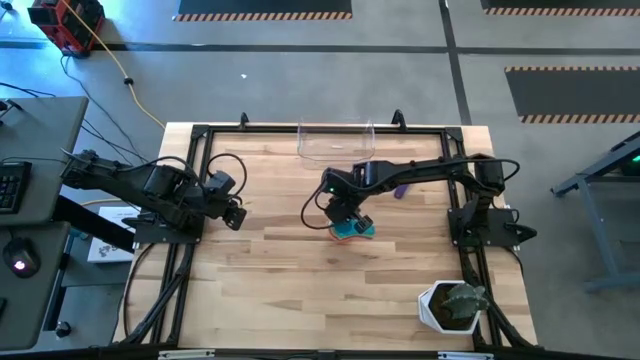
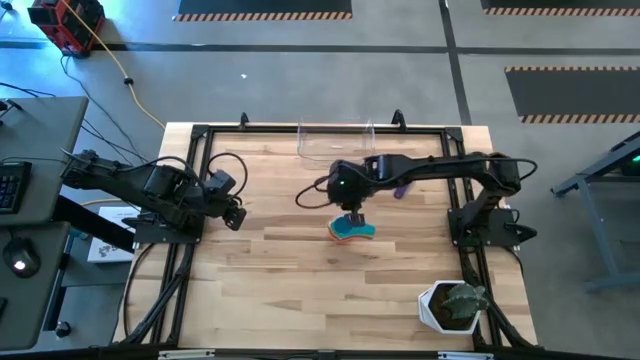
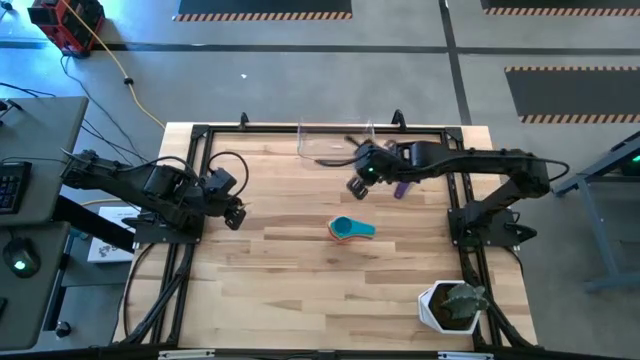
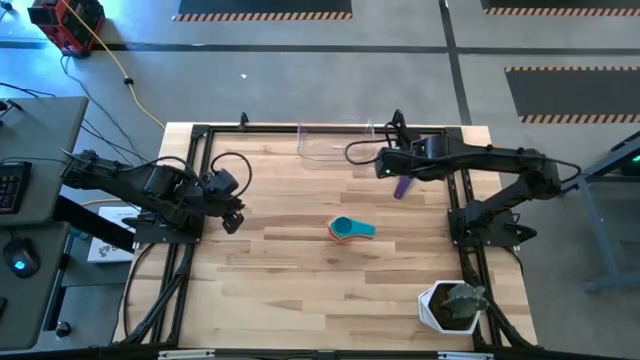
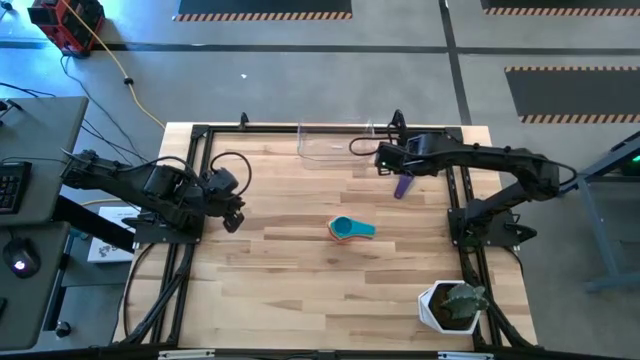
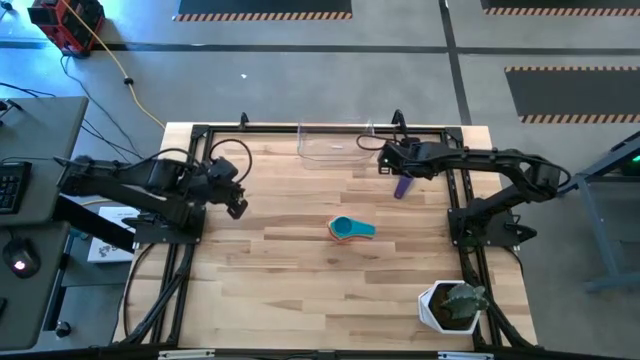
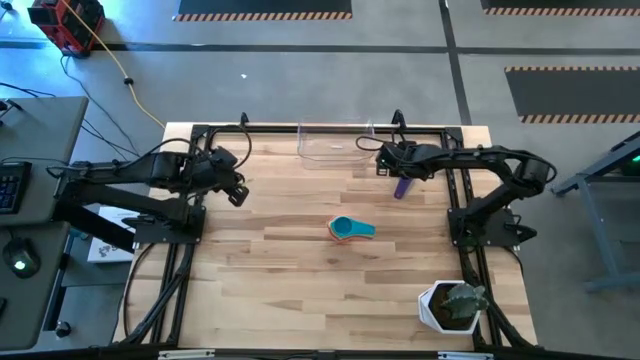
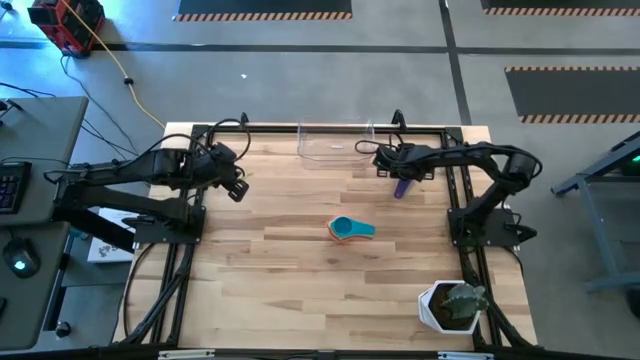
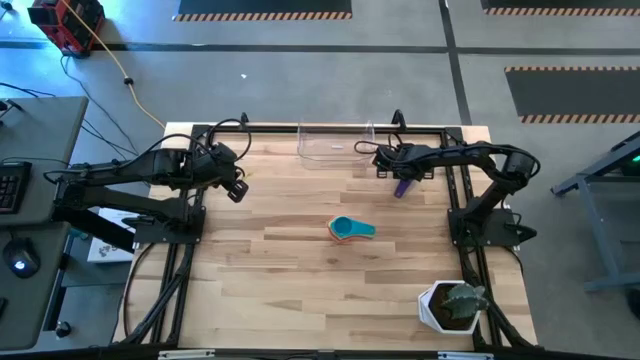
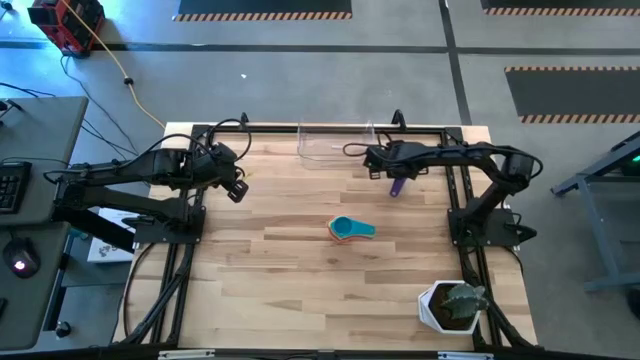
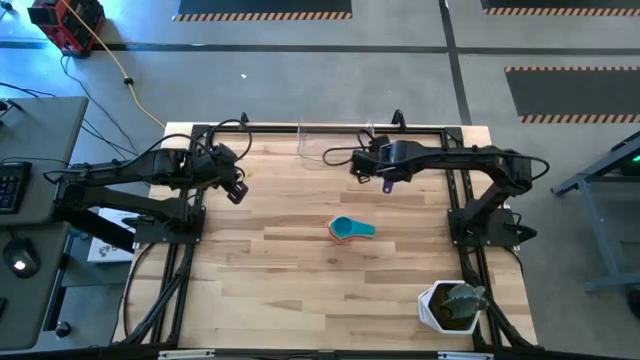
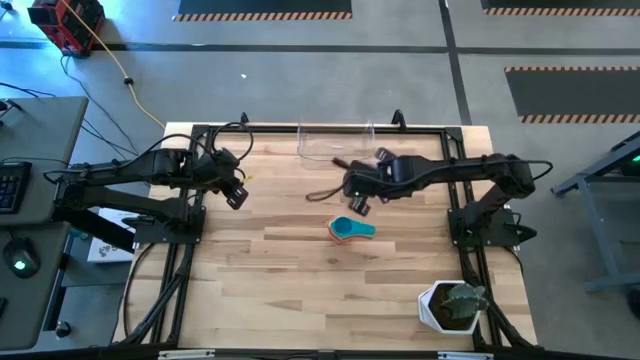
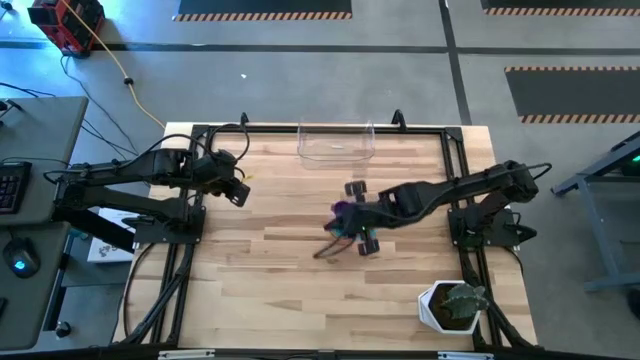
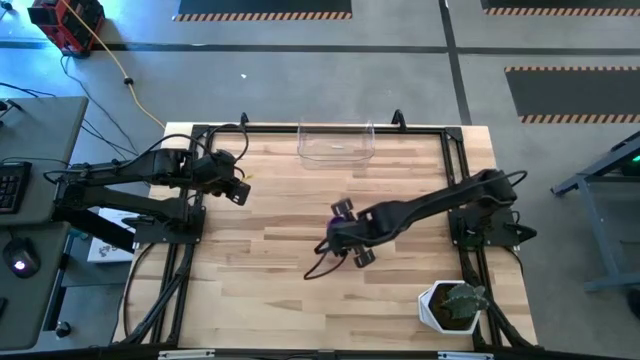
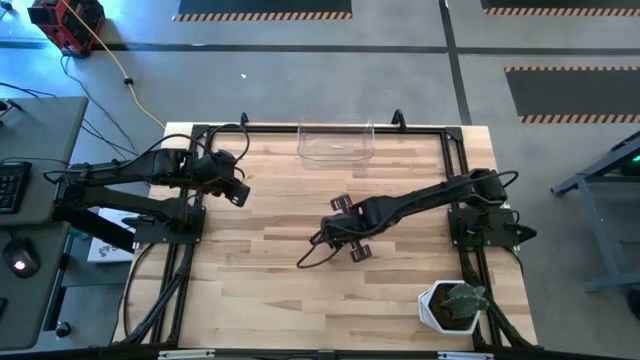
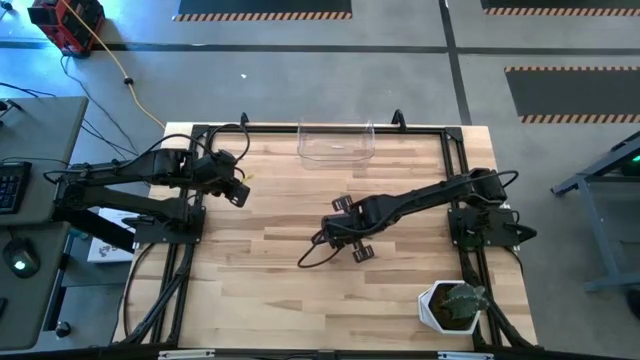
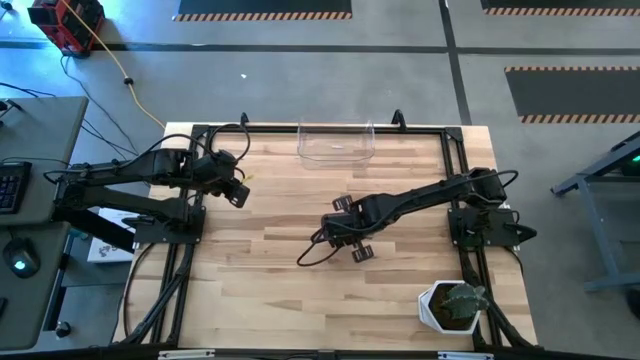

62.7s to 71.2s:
Task: Nest measuring cups in basket
Stack the dark blue measuring cup on top of the light blue measuring cup

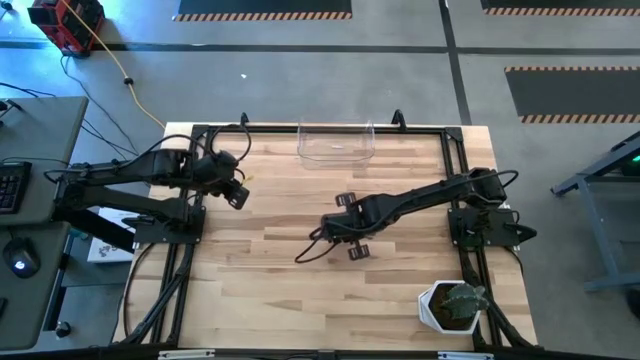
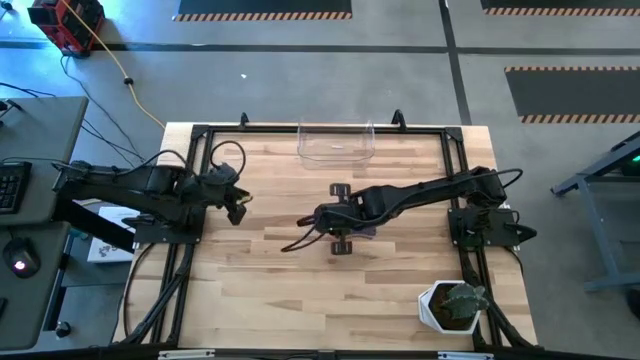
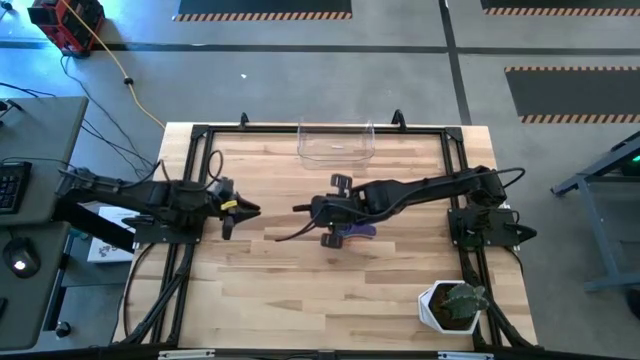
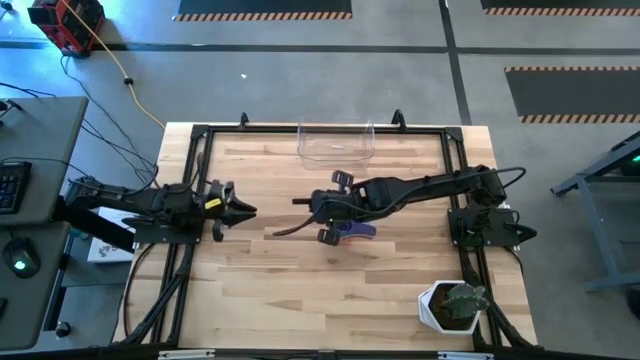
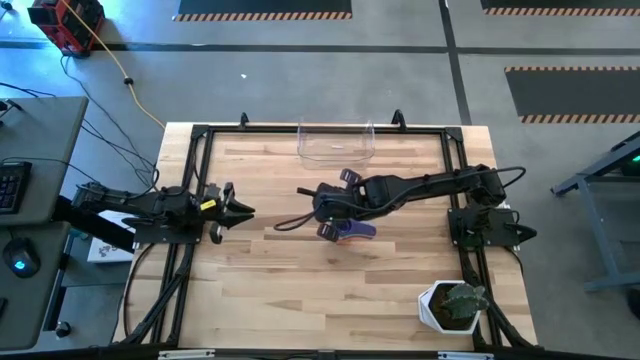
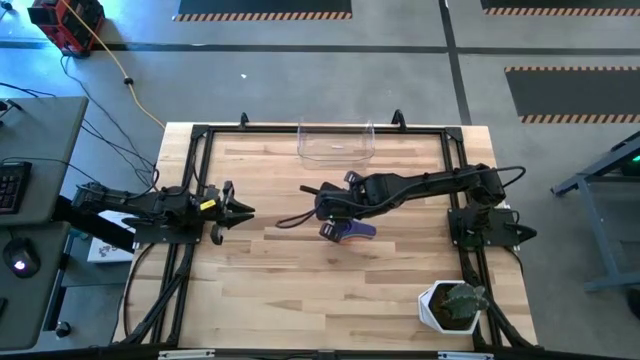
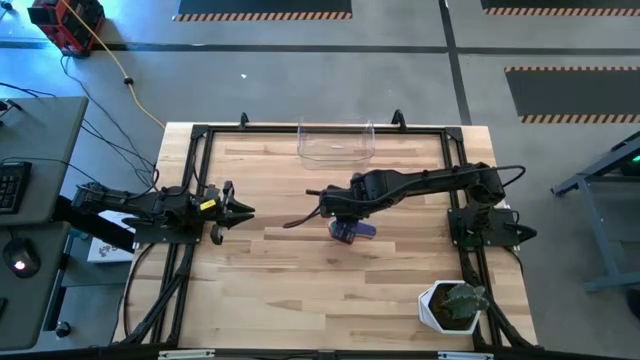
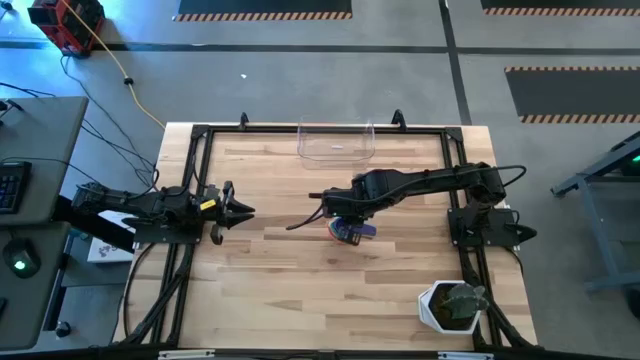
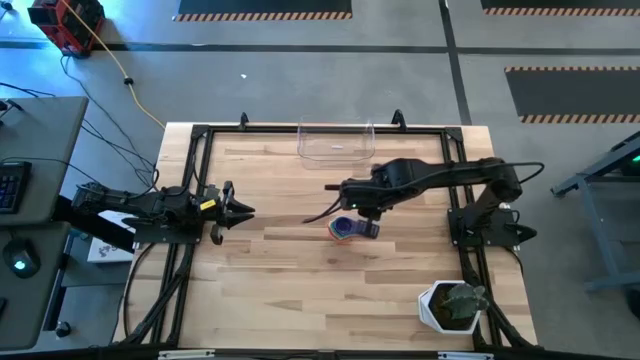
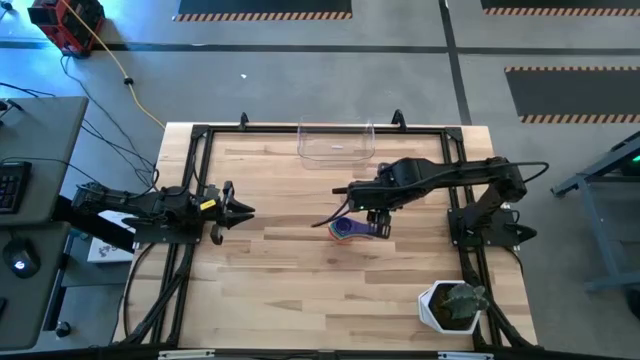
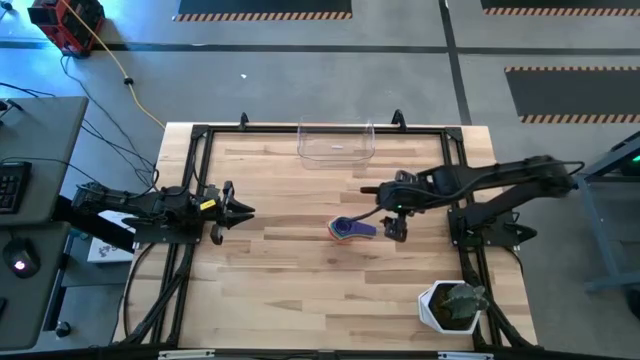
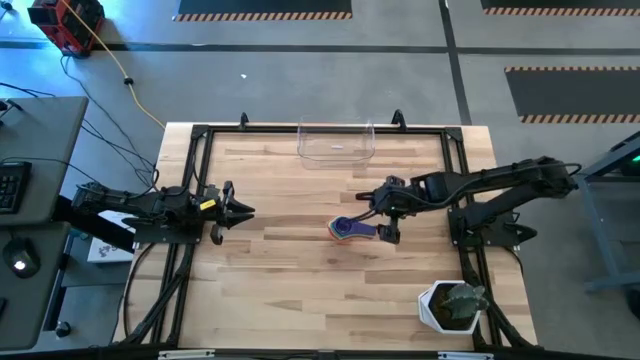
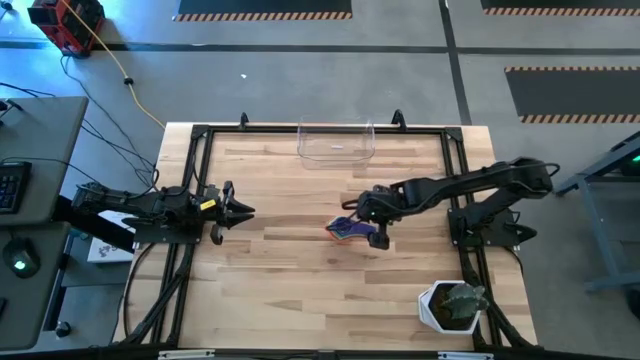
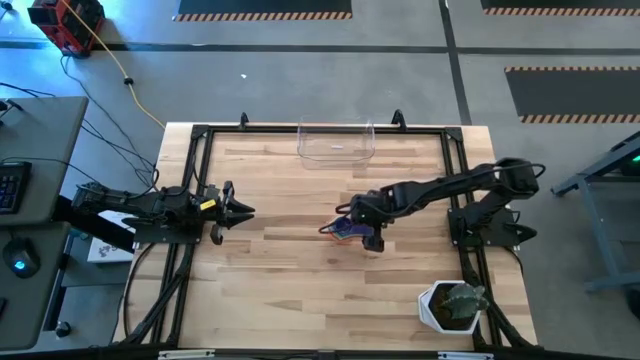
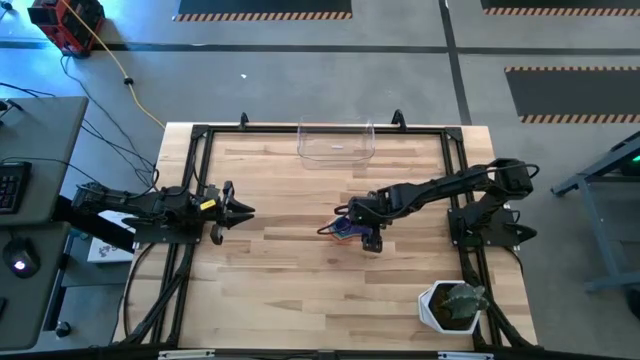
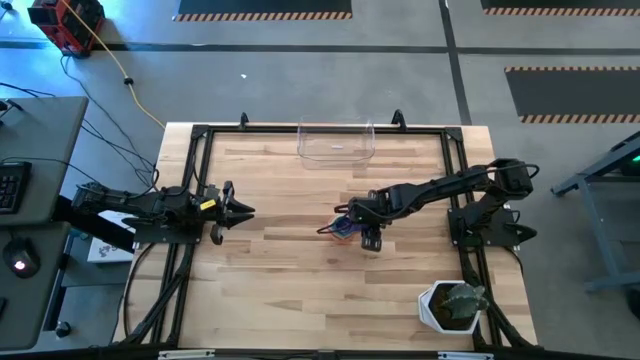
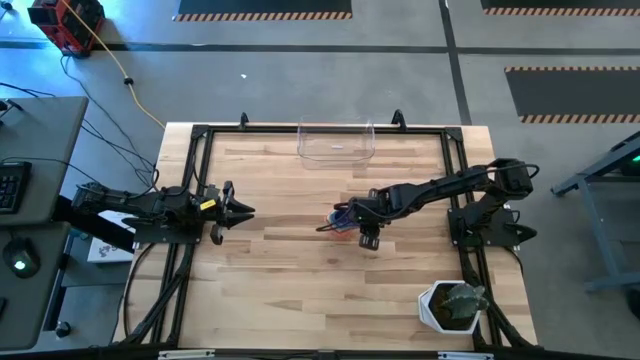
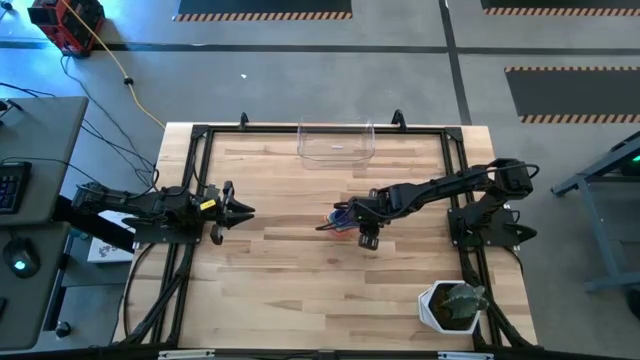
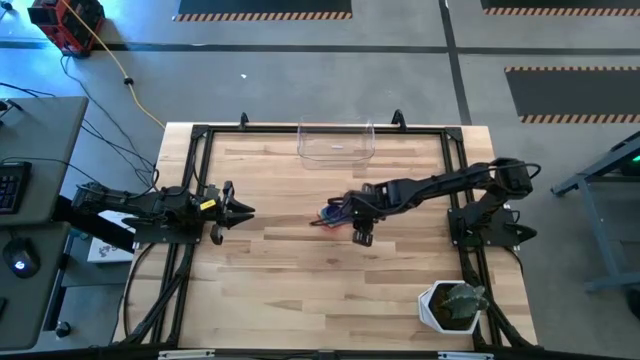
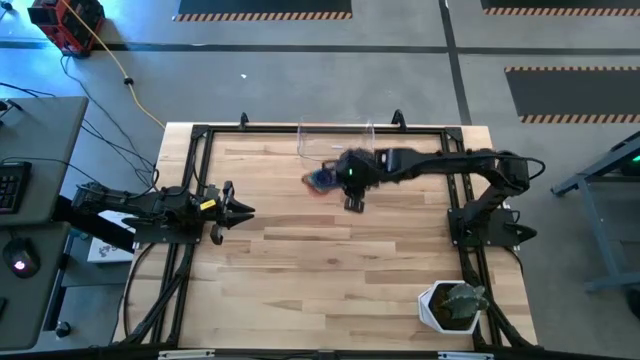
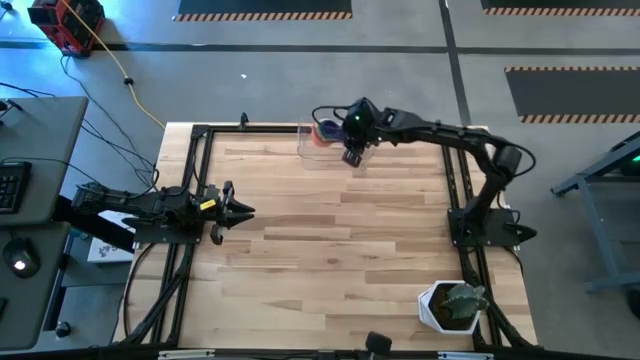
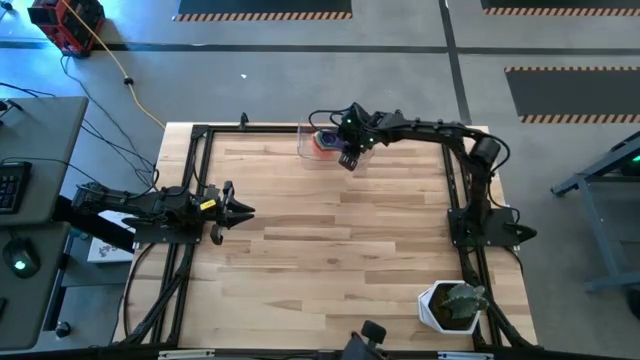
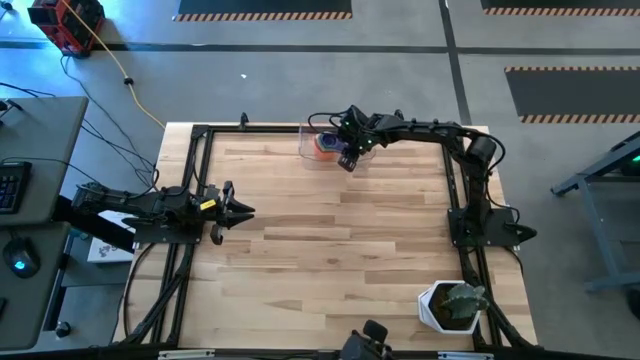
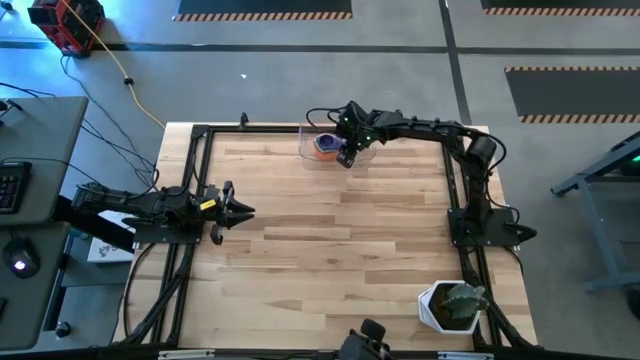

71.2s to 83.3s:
Put the nested measuring cups into the transparent bin
